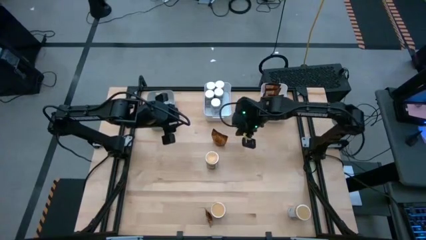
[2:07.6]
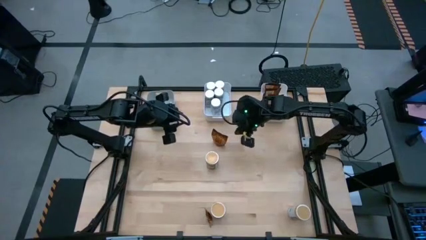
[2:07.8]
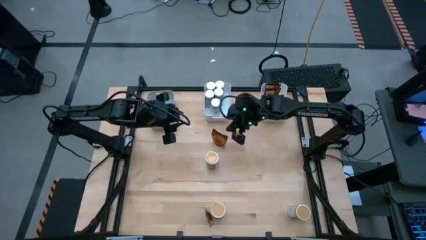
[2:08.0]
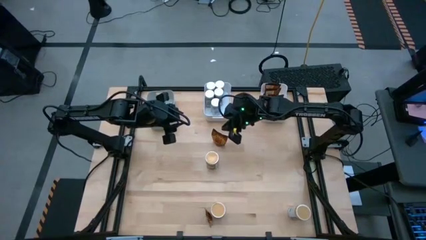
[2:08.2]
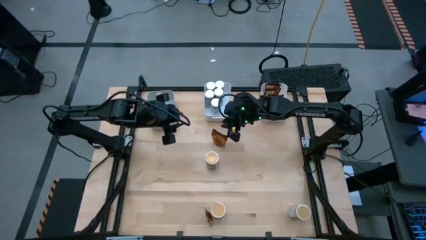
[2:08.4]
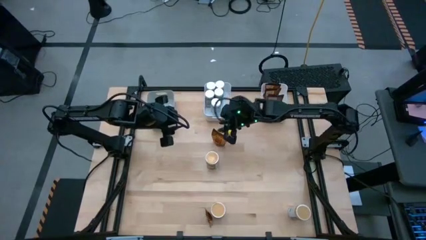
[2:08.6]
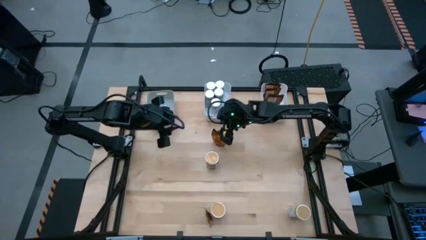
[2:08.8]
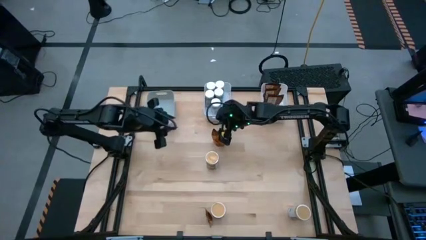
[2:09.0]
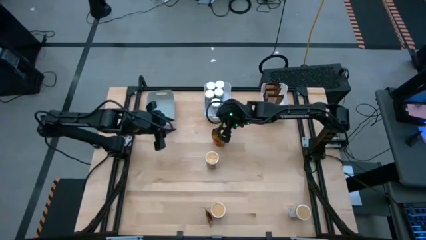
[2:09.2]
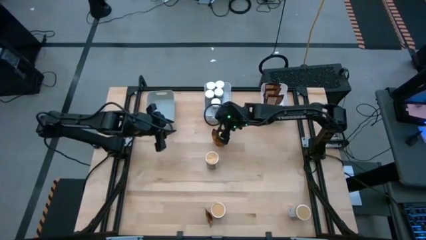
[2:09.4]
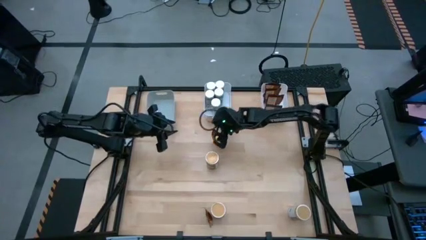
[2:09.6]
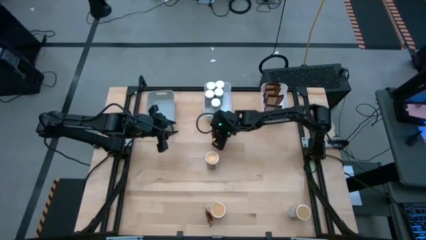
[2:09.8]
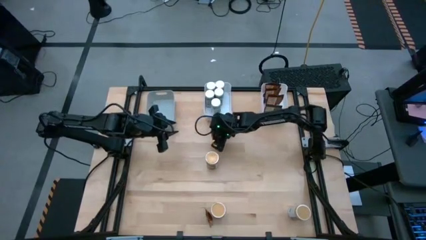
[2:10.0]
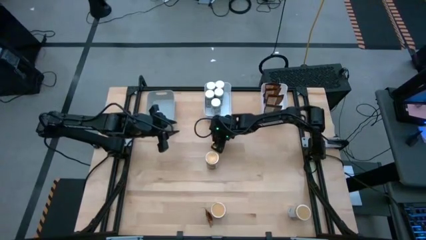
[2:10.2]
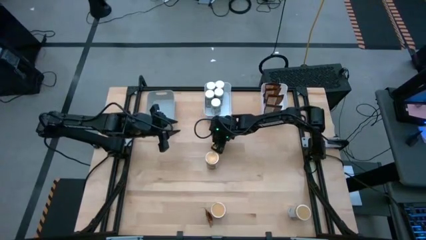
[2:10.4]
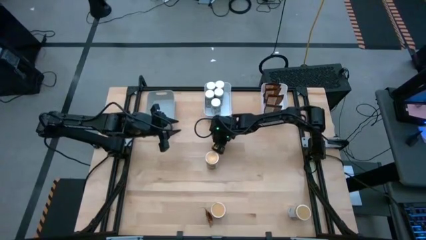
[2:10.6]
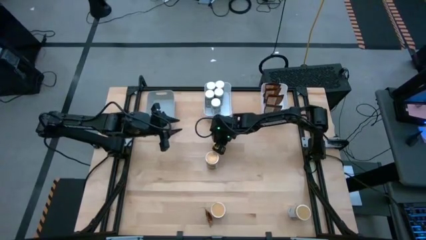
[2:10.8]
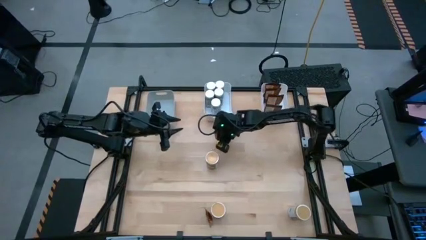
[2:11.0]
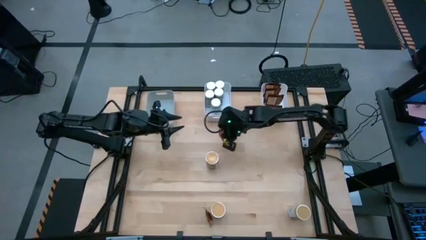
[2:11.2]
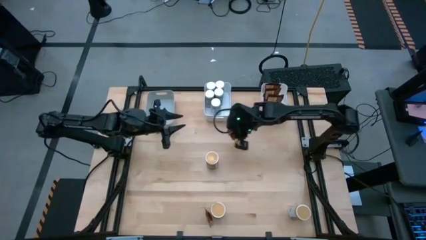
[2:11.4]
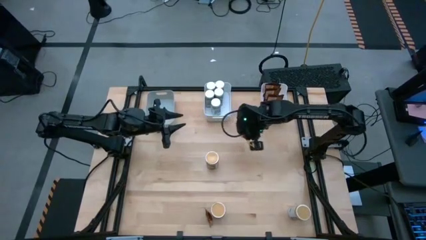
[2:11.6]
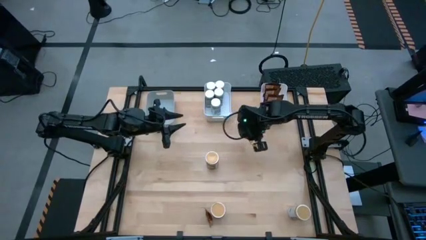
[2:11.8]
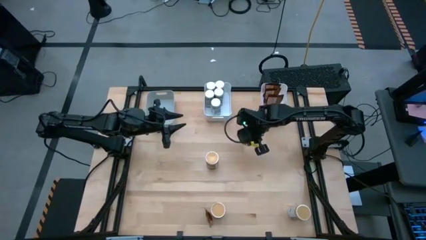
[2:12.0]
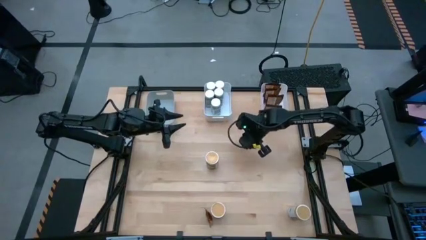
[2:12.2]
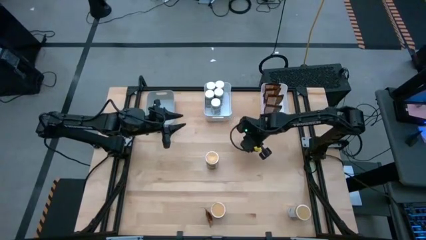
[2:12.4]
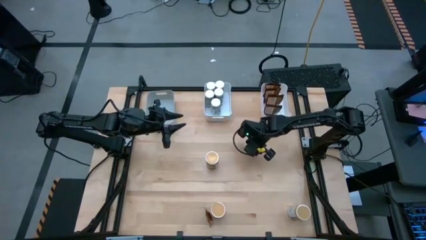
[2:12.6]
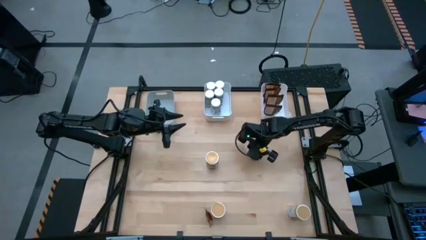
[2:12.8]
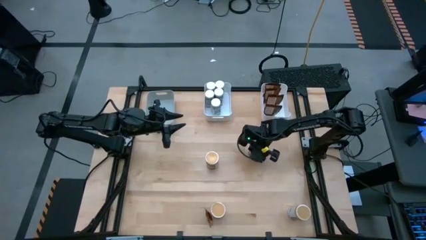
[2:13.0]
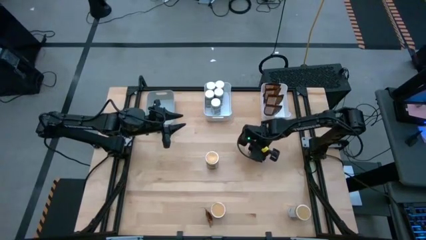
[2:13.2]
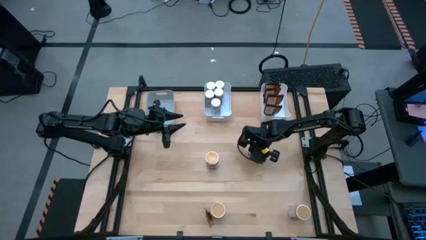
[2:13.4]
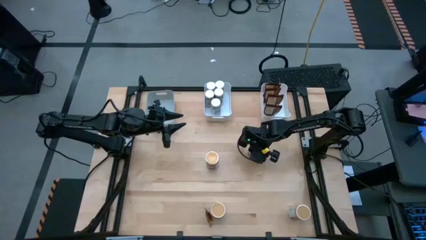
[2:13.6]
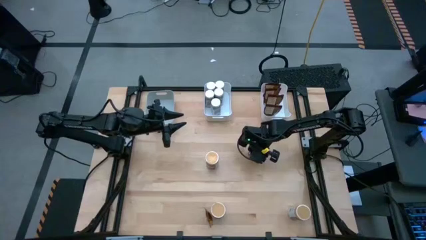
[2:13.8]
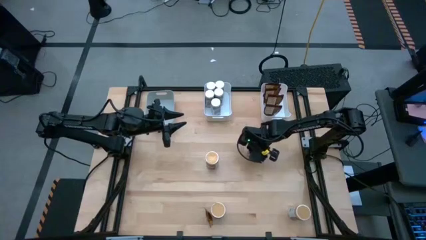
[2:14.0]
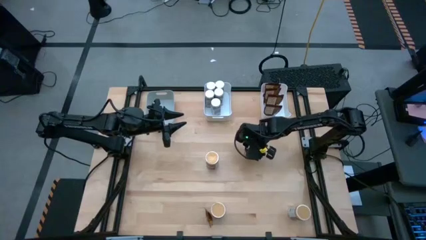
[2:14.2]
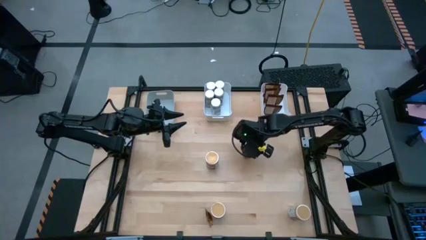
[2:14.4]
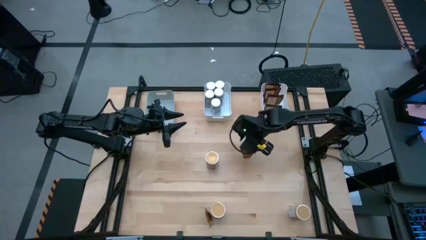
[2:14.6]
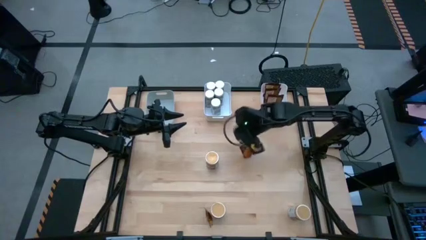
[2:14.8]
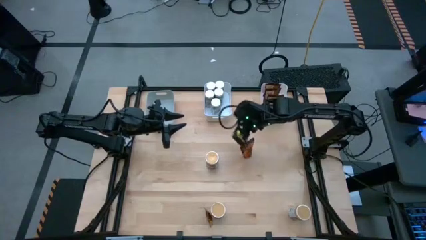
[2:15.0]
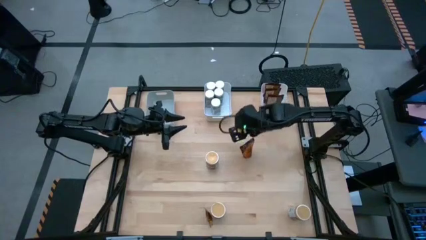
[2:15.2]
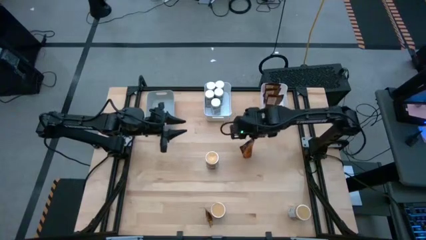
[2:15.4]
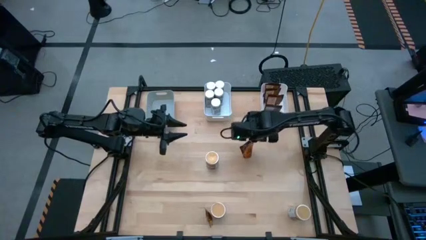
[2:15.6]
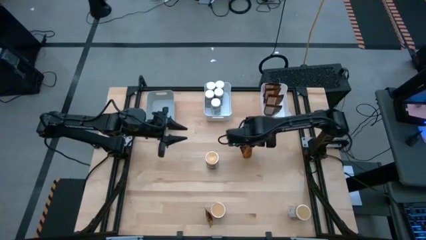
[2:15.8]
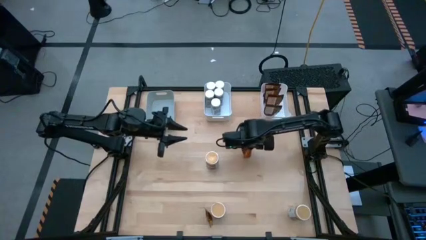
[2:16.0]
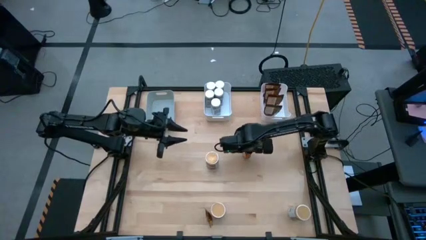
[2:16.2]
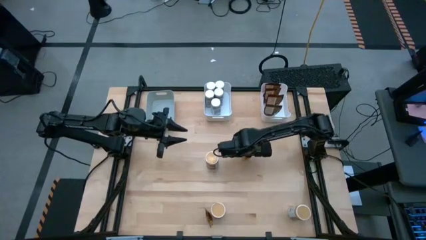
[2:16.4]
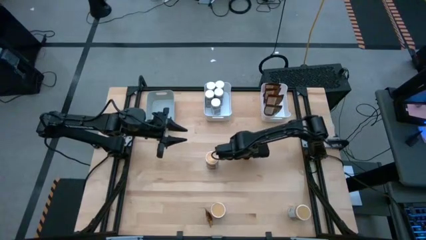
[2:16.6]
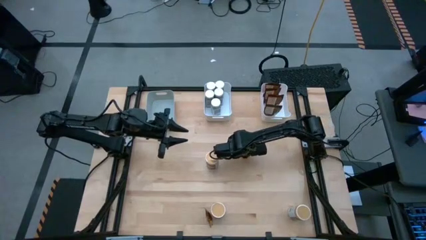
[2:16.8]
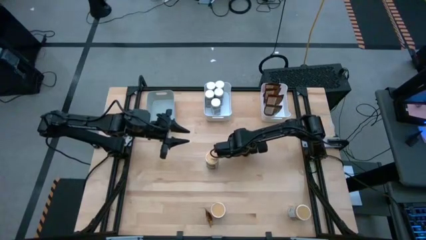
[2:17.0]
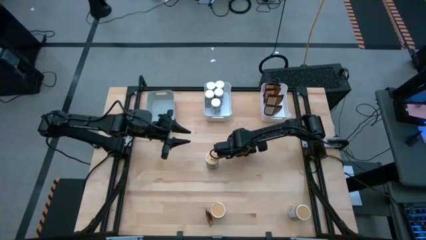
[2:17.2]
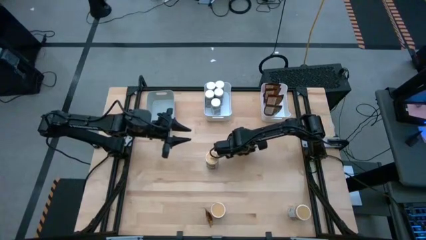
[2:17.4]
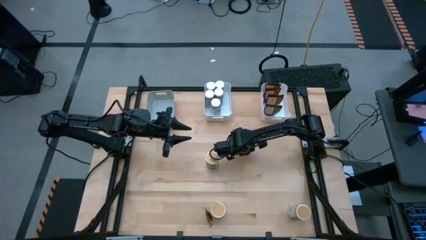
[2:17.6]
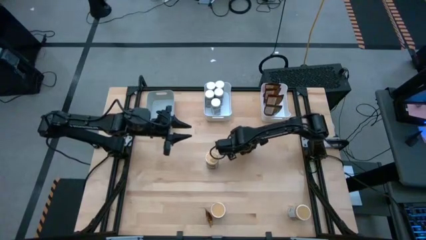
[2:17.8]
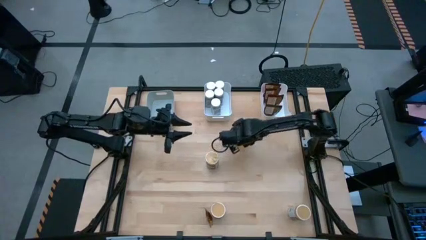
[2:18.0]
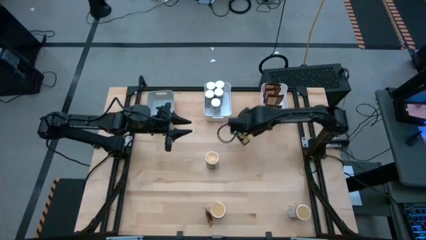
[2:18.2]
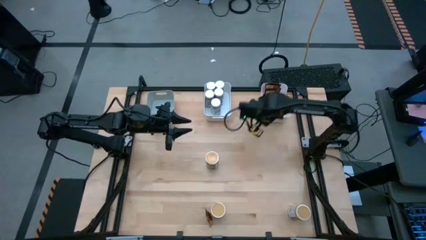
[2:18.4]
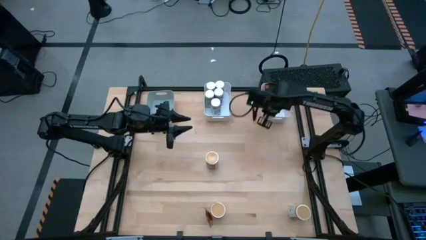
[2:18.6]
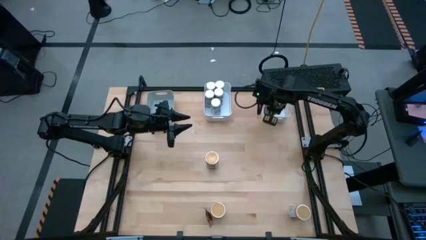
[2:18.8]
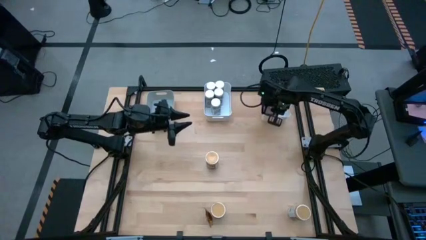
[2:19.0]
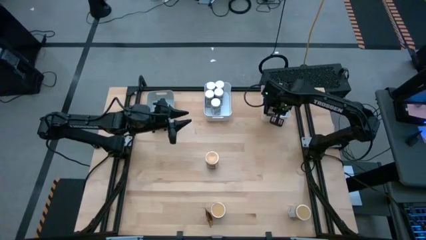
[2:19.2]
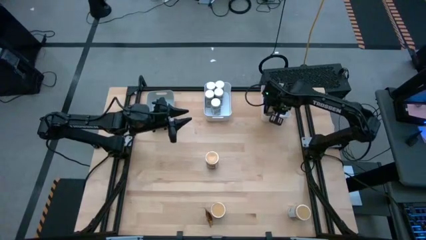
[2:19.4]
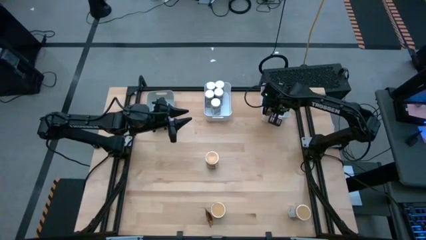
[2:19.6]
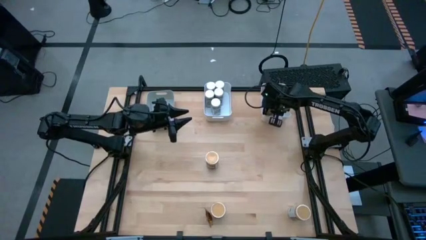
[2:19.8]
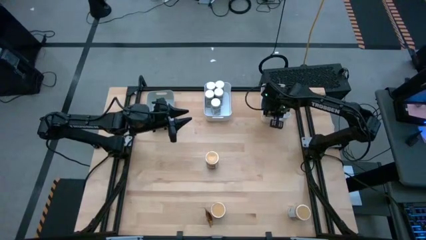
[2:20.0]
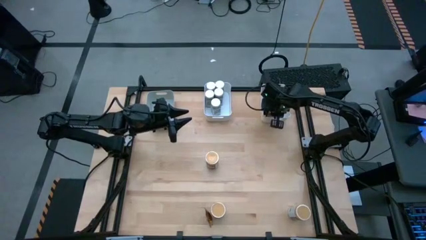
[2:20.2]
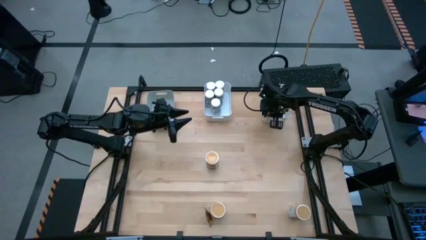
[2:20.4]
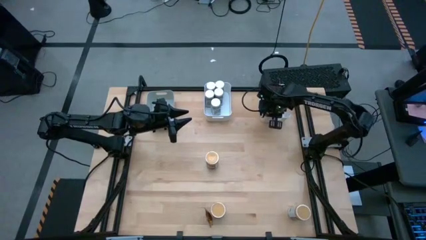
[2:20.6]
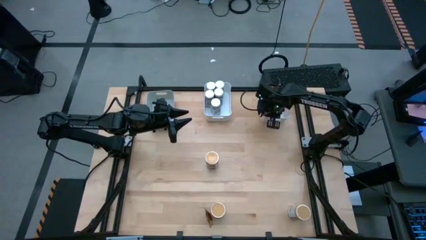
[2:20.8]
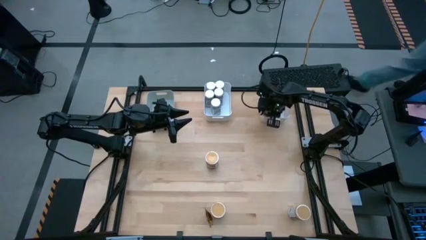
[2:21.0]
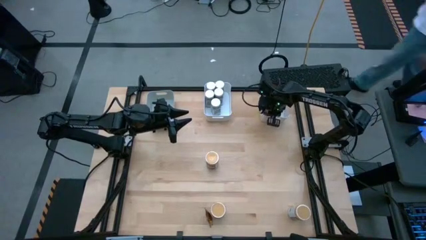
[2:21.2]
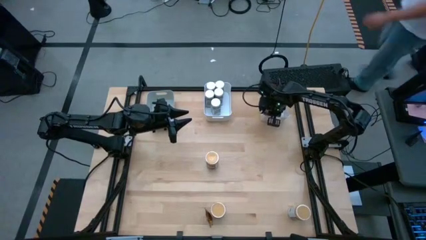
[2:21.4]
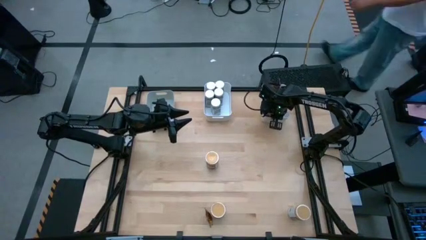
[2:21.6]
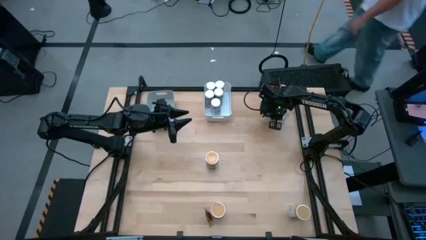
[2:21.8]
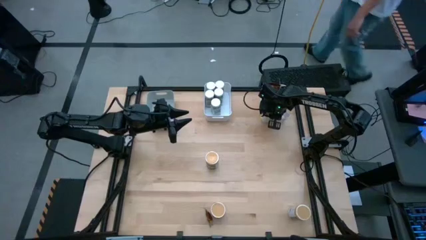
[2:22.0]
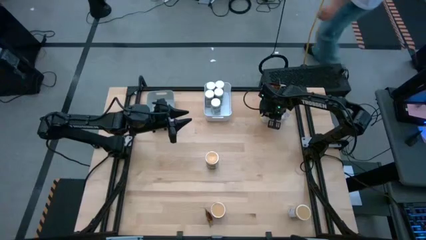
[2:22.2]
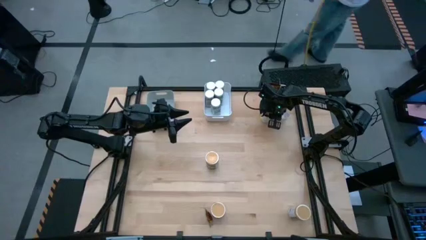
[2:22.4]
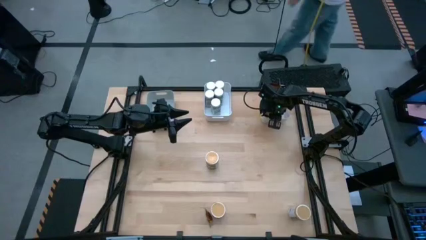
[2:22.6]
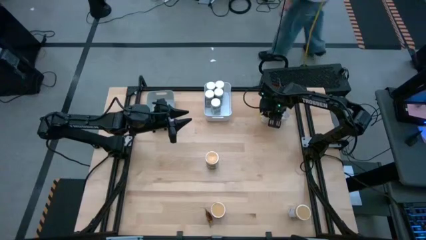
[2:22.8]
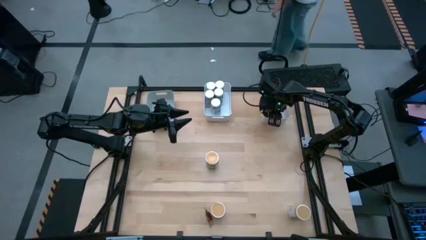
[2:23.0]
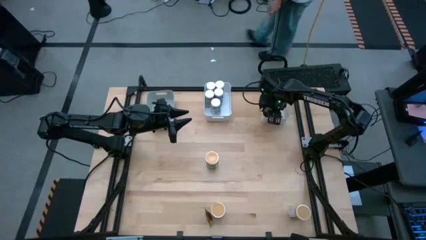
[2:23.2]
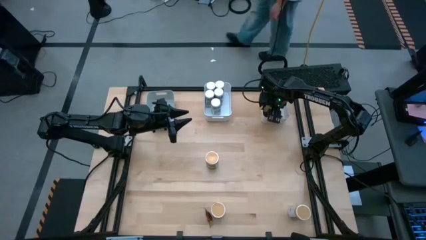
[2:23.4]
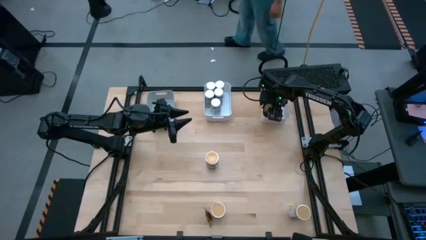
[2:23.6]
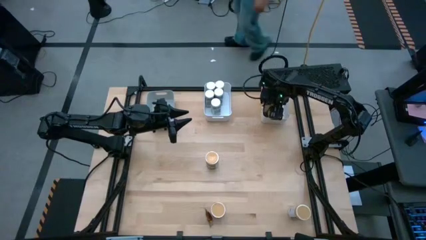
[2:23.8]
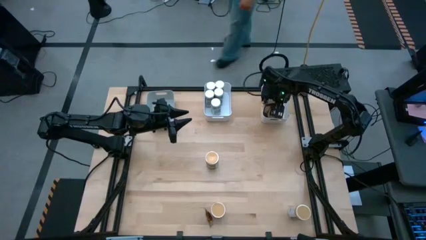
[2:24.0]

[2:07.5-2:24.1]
Task: Sort spices by type
Put the orange seasoning bag into the right white bin
